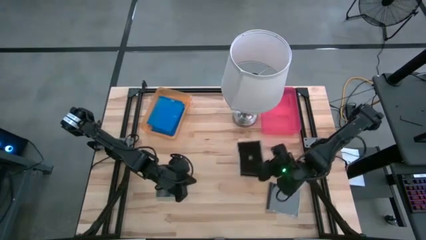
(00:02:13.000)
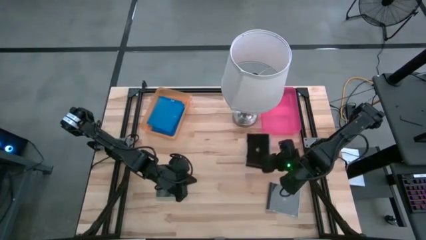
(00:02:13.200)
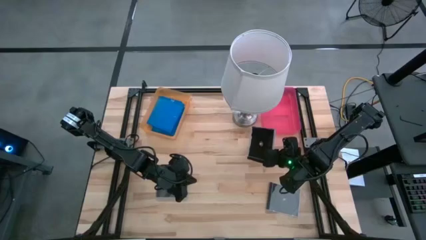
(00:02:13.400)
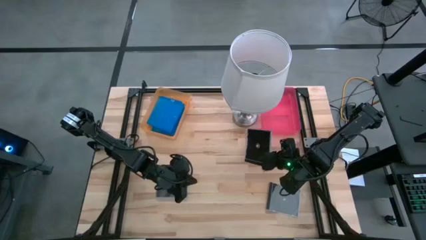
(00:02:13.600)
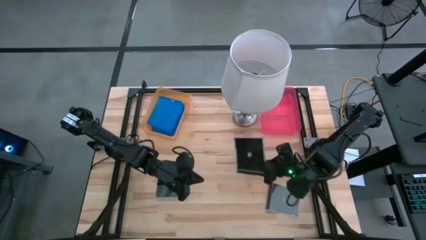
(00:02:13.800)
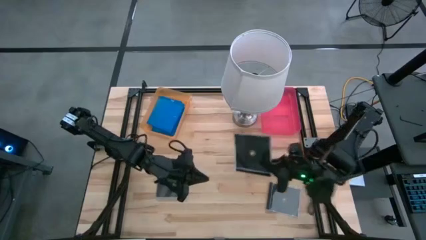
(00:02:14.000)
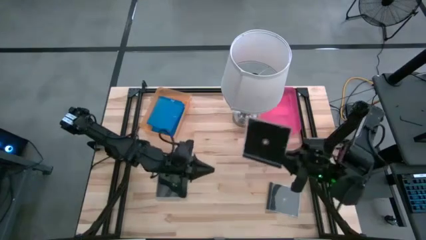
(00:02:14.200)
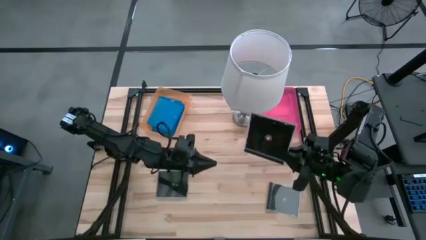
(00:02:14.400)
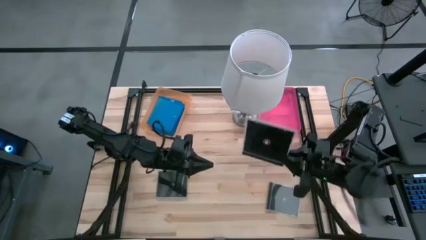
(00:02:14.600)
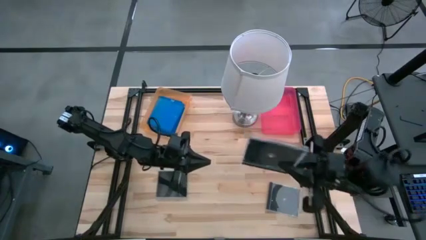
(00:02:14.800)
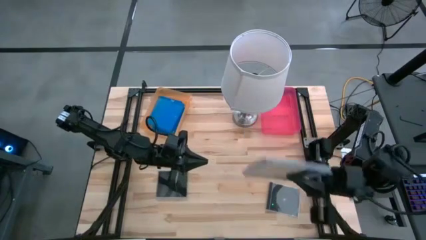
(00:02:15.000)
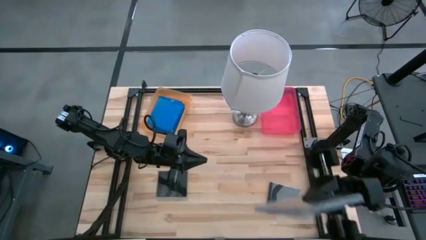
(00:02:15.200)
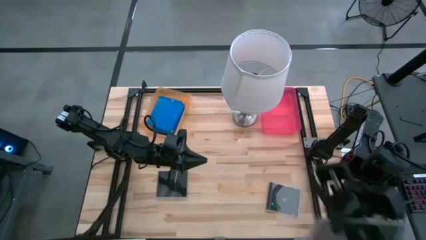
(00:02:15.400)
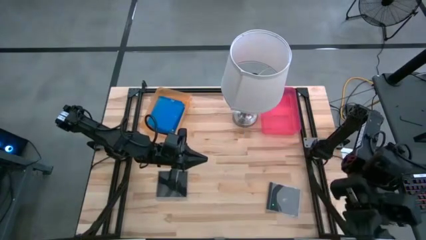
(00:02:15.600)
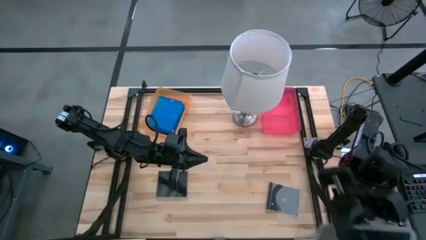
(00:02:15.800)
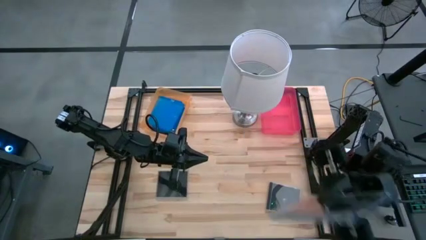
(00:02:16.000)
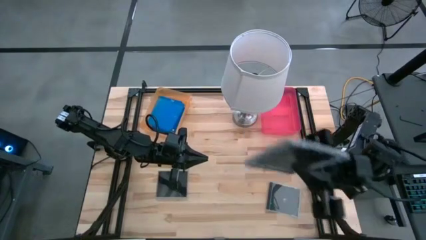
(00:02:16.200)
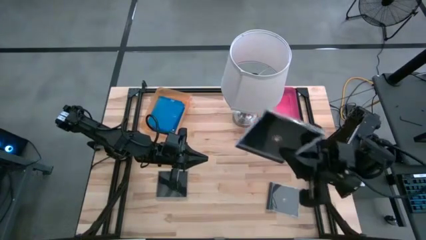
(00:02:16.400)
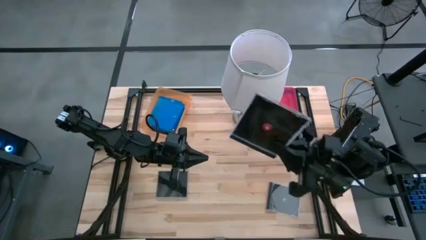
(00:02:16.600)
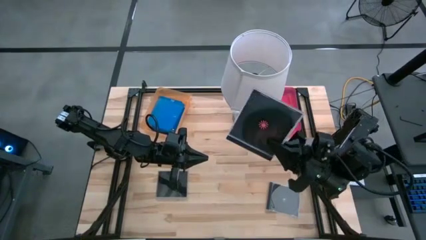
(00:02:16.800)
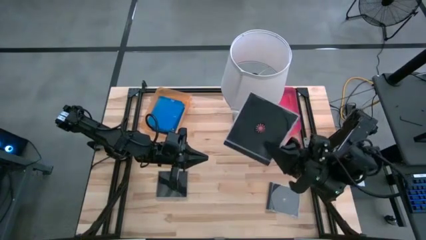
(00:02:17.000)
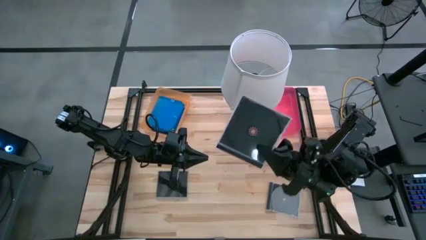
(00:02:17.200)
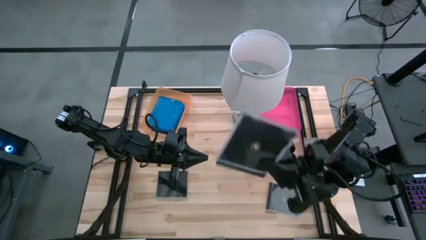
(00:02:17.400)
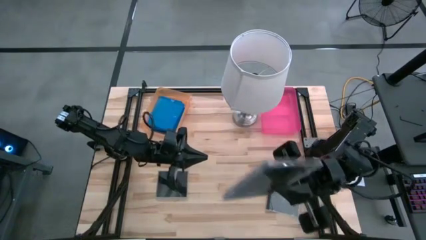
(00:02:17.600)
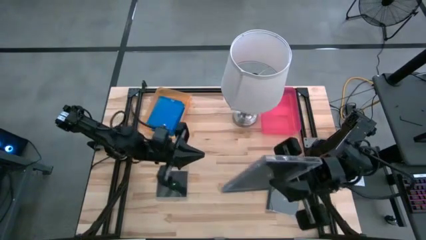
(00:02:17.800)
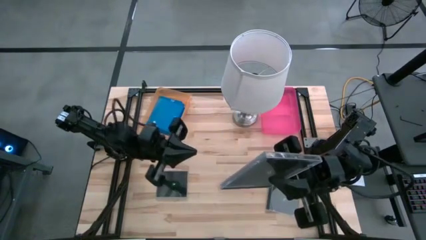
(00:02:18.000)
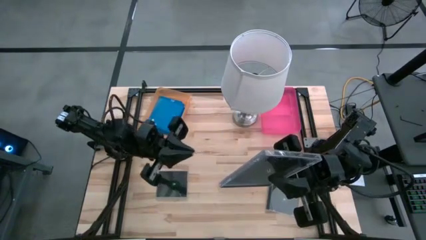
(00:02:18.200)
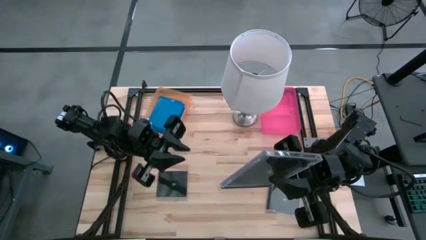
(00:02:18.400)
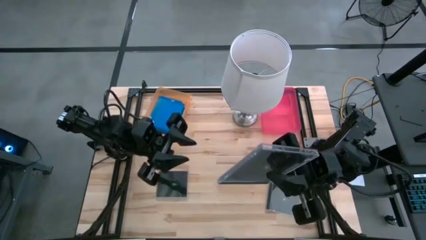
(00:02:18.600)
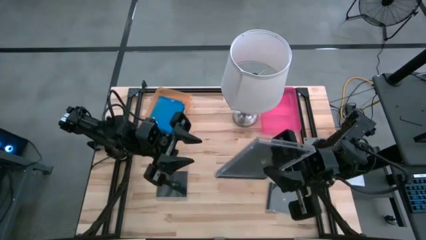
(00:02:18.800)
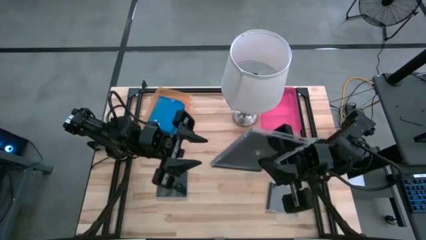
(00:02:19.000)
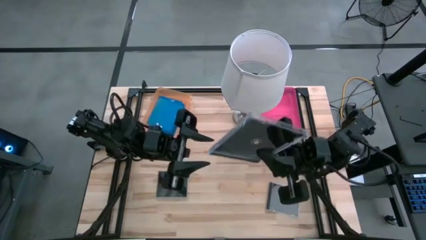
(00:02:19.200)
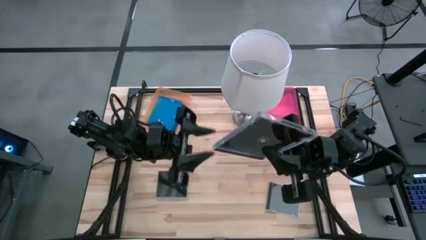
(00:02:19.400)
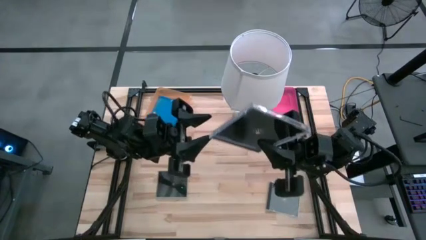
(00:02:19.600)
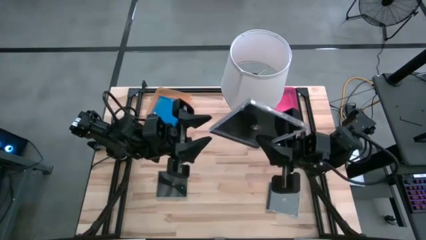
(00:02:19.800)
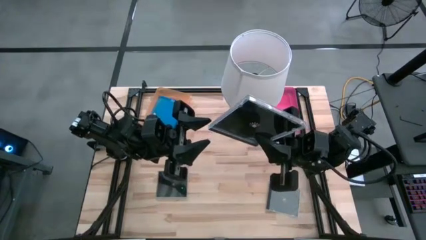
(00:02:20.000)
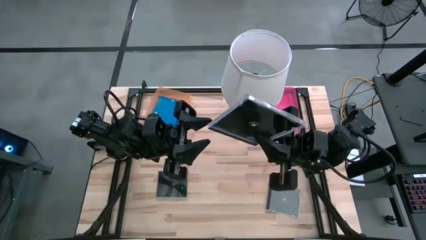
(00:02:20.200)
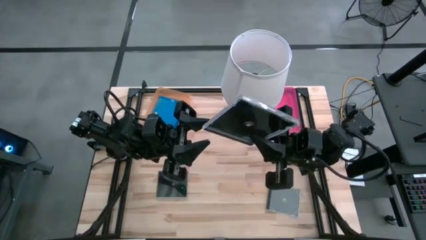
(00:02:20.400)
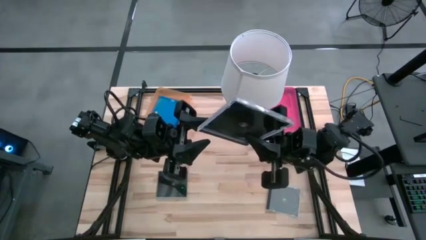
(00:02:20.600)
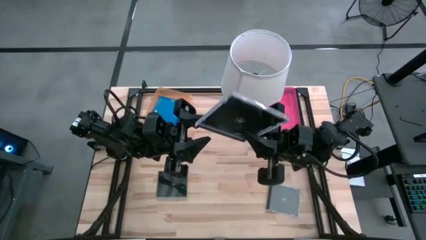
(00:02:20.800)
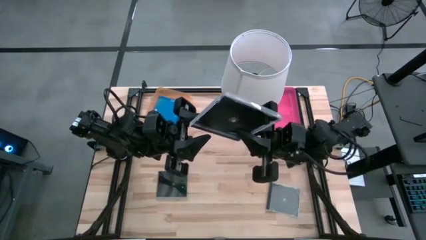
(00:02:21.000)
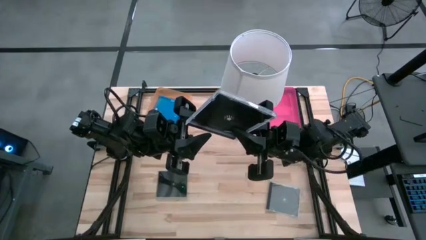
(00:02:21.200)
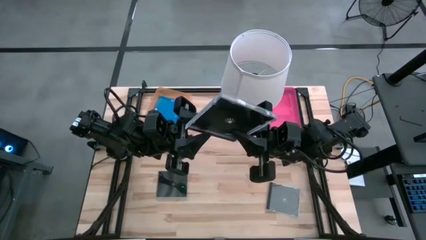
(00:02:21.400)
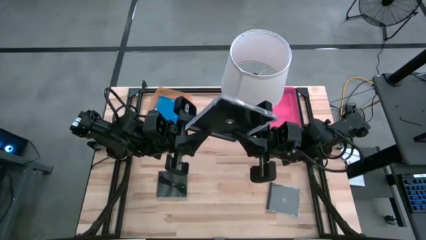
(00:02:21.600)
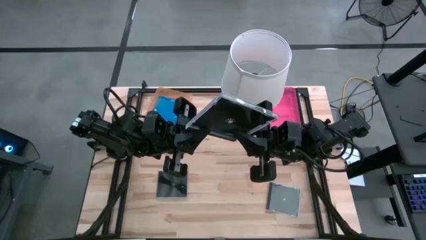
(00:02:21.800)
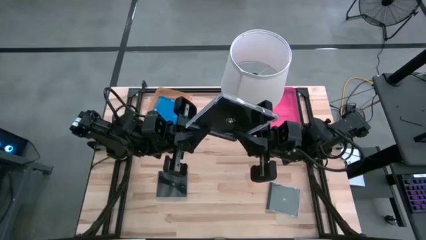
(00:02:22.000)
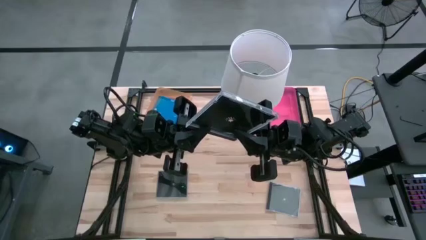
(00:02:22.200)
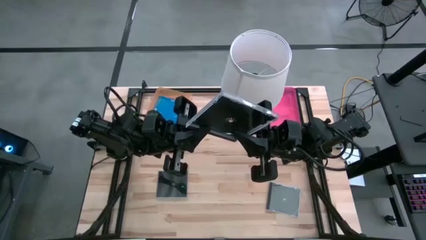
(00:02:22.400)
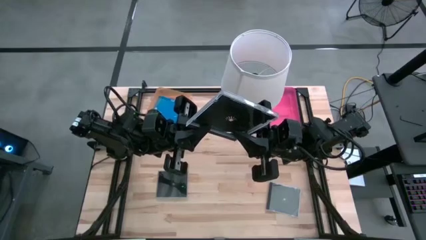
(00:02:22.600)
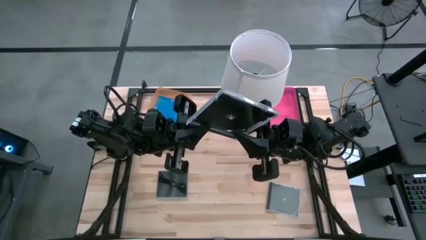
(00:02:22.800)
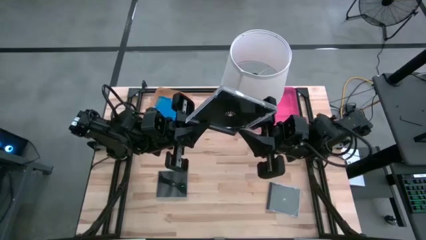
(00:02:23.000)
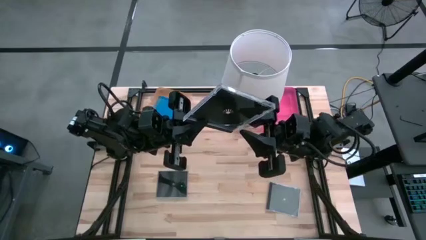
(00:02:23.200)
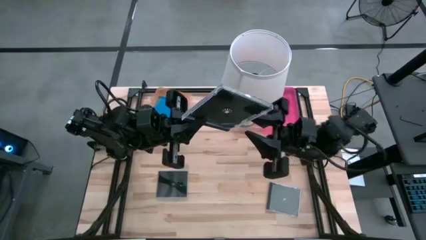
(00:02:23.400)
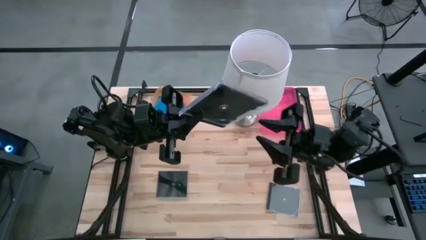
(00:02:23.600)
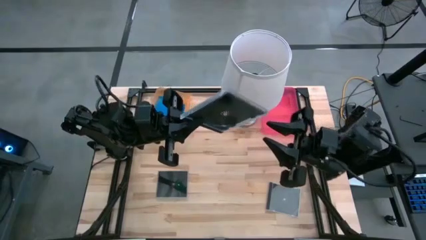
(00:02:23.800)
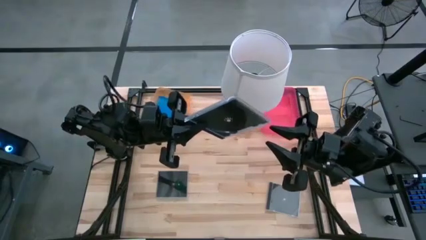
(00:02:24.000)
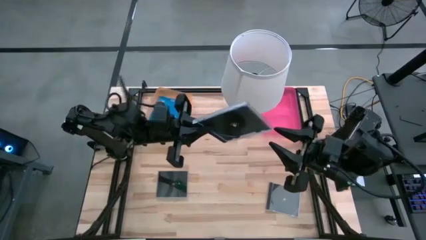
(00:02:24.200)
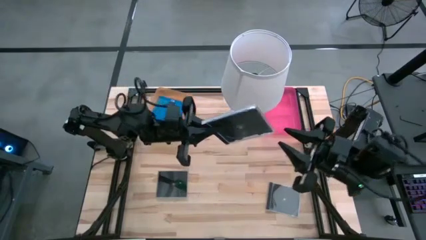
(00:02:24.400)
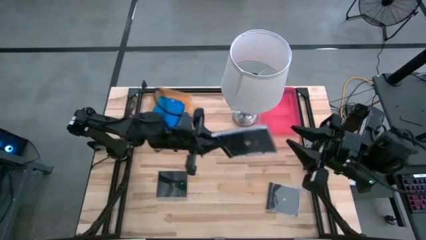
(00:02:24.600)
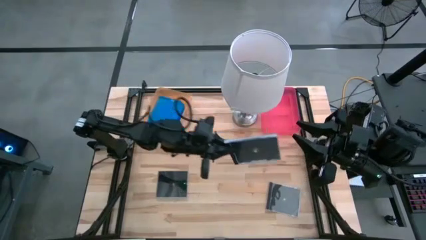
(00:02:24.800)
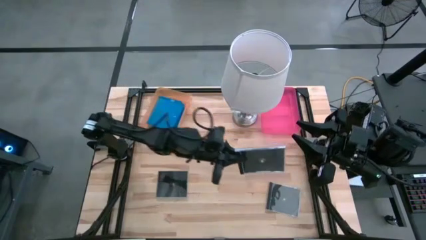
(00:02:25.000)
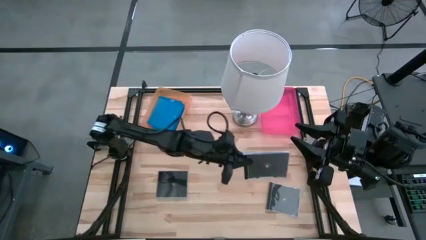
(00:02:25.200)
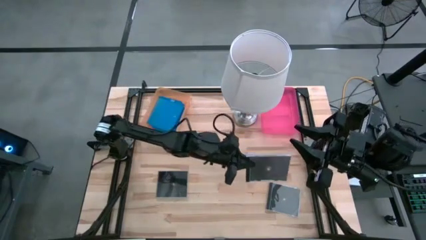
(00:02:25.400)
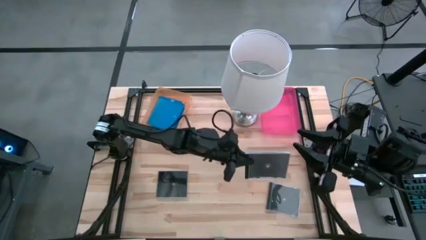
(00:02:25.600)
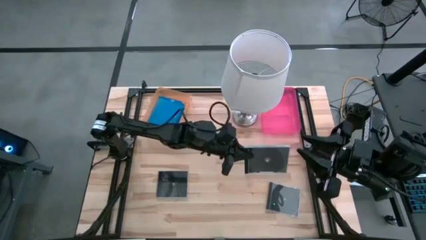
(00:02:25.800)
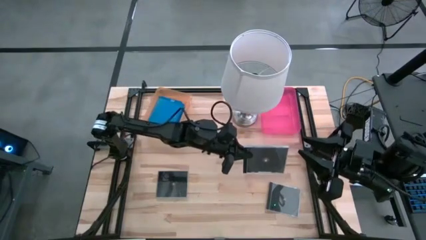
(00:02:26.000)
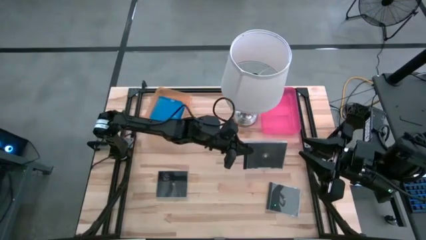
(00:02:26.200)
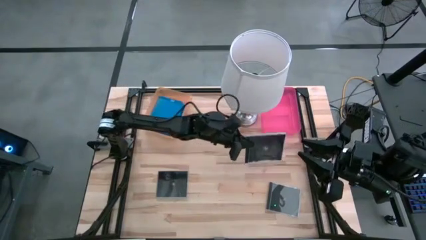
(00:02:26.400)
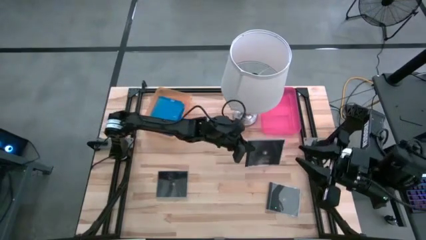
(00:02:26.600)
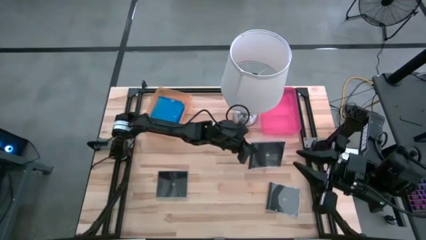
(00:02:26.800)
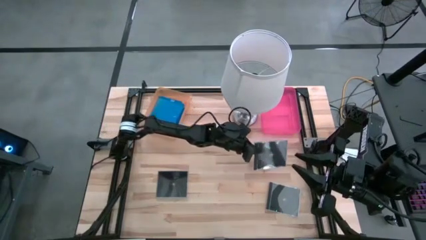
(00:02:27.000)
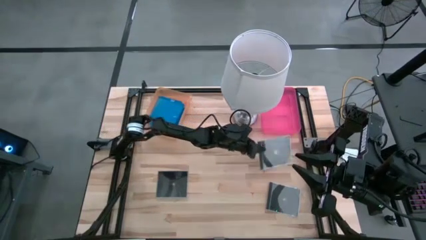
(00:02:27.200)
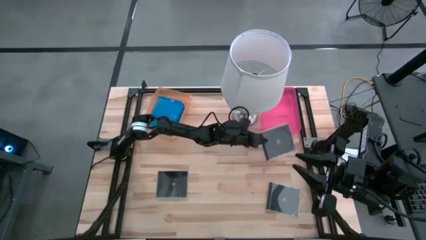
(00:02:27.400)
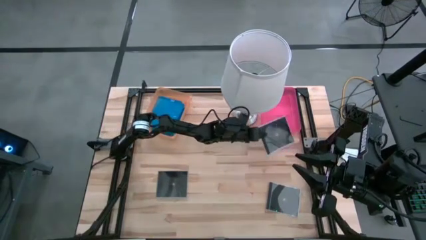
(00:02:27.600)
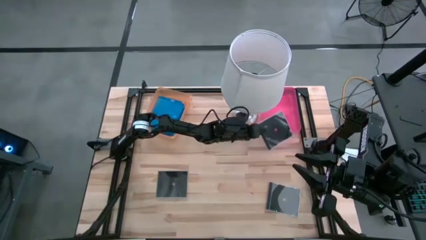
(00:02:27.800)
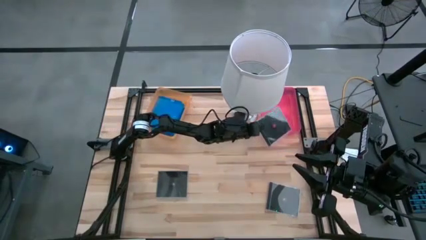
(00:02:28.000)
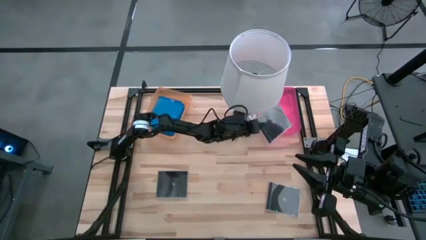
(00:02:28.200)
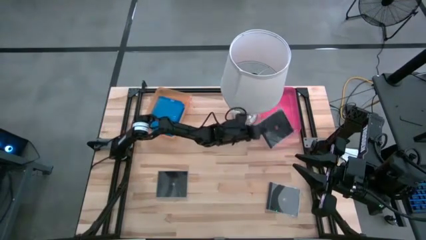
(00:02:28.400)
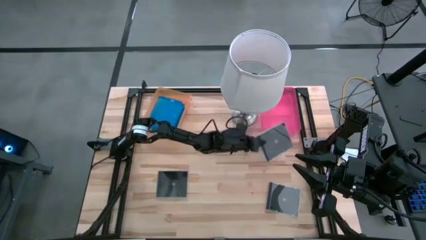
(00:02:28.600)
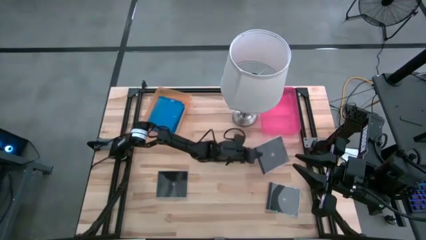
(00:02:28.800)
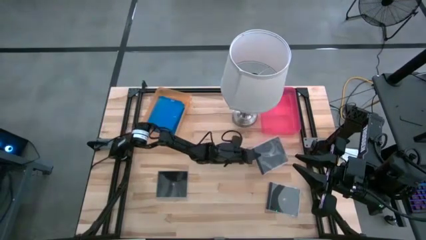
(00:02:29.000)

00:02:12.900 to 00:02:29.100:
Task: Pick & place jewel cases by type
Put the middle black cd case into the pink bin
